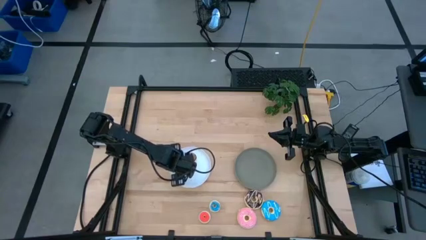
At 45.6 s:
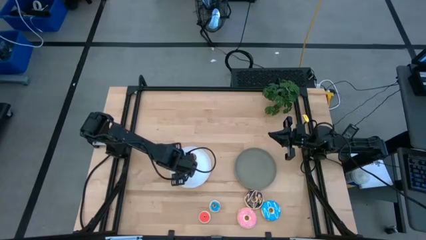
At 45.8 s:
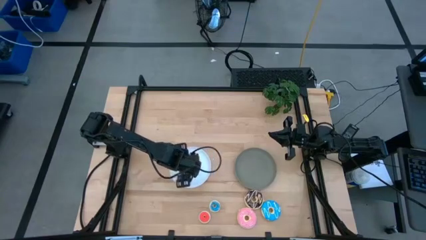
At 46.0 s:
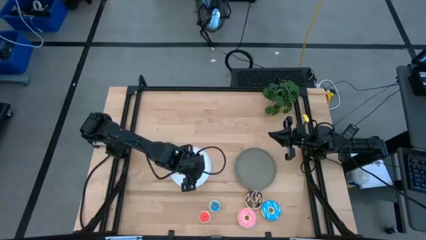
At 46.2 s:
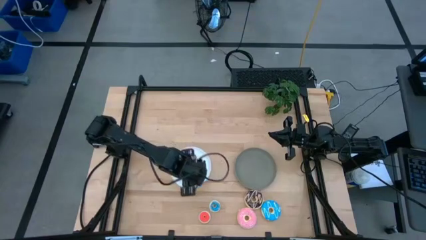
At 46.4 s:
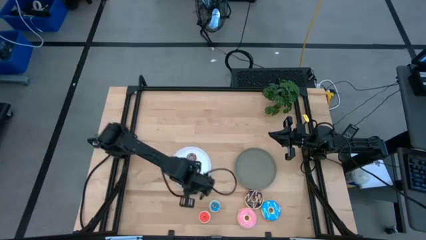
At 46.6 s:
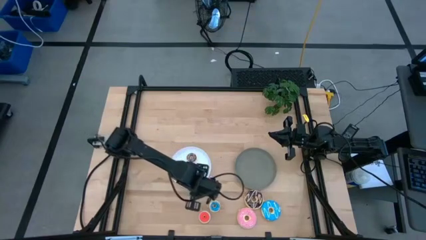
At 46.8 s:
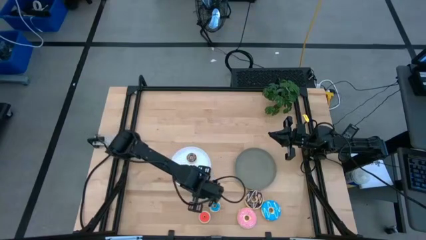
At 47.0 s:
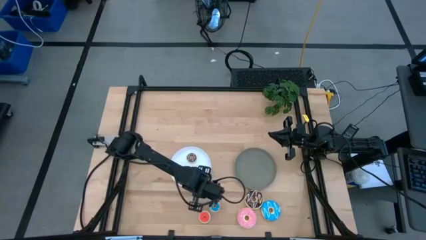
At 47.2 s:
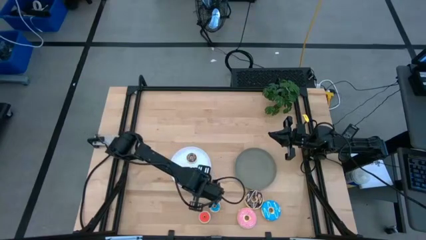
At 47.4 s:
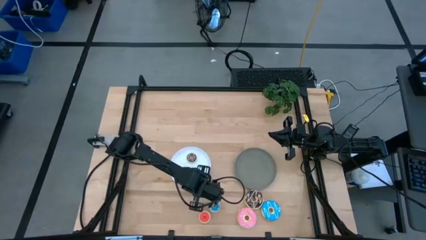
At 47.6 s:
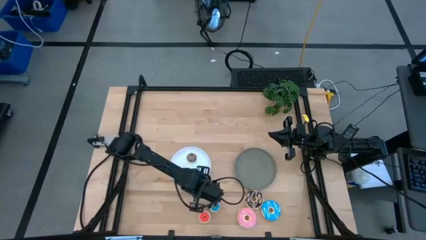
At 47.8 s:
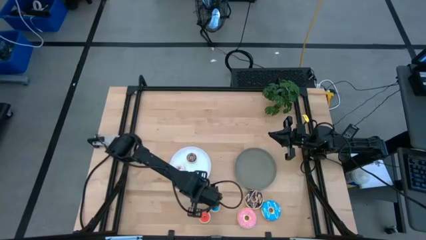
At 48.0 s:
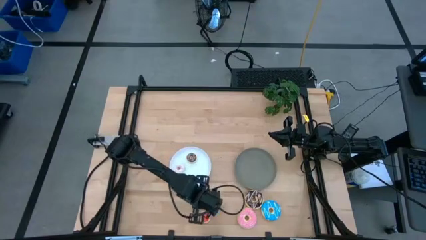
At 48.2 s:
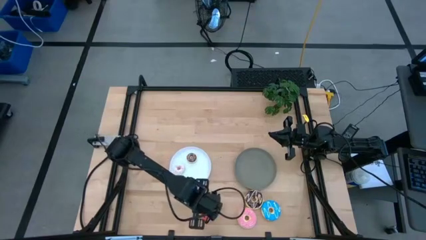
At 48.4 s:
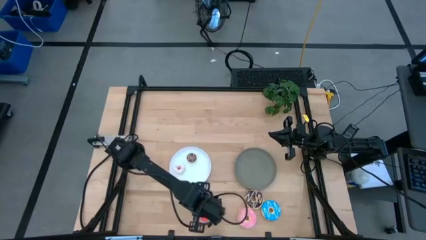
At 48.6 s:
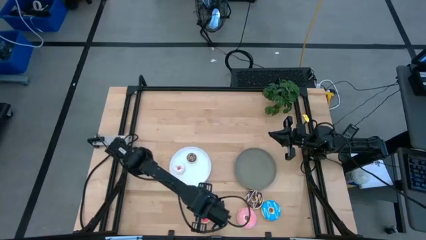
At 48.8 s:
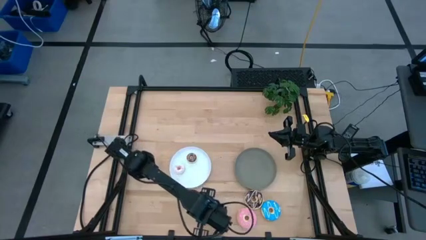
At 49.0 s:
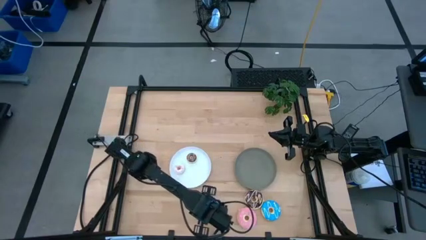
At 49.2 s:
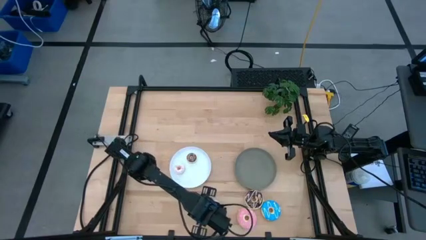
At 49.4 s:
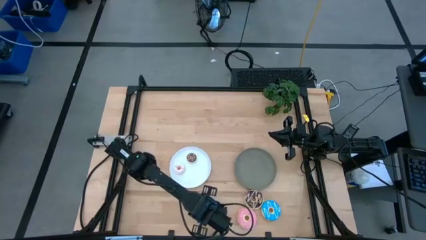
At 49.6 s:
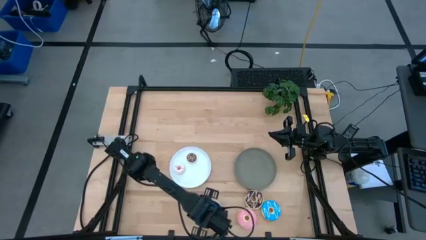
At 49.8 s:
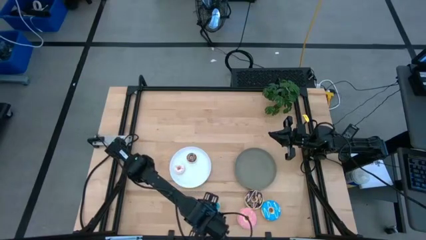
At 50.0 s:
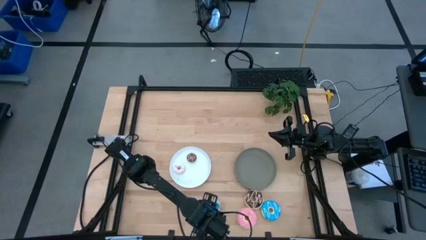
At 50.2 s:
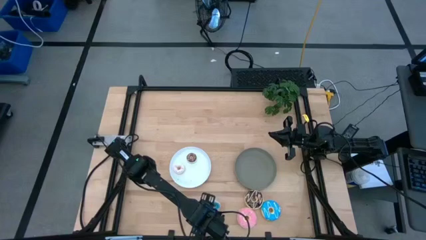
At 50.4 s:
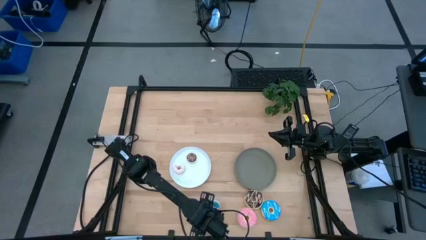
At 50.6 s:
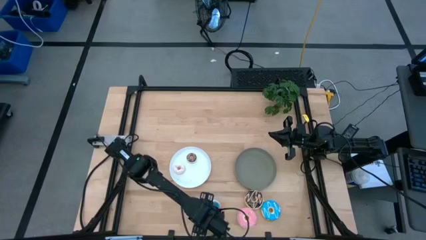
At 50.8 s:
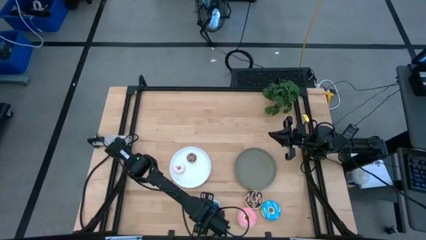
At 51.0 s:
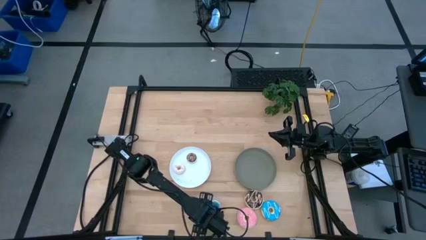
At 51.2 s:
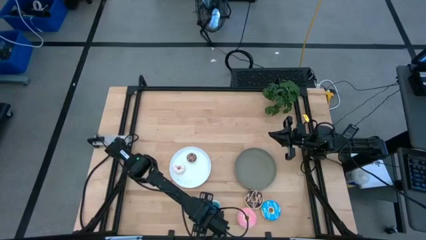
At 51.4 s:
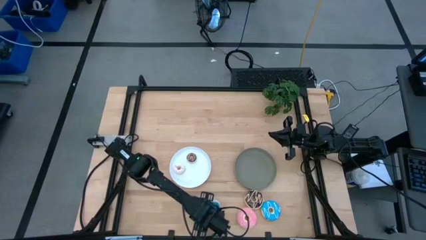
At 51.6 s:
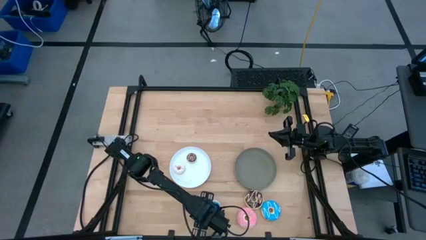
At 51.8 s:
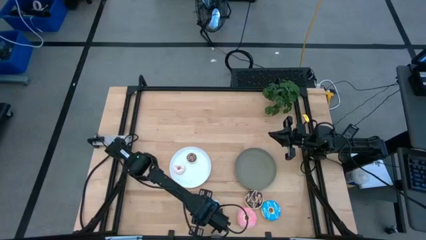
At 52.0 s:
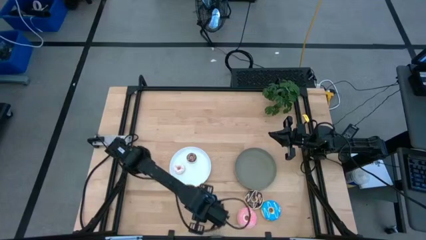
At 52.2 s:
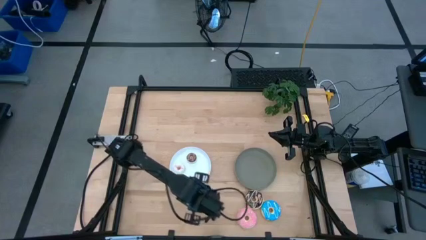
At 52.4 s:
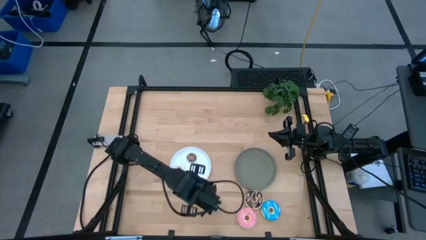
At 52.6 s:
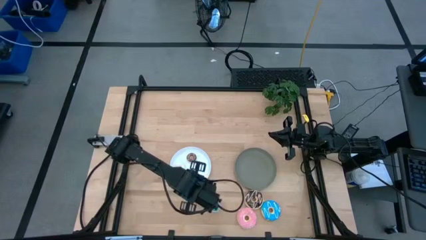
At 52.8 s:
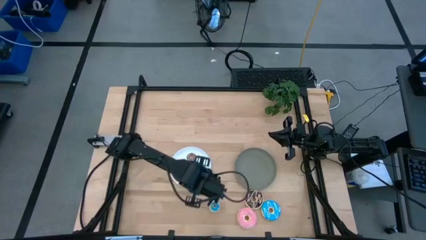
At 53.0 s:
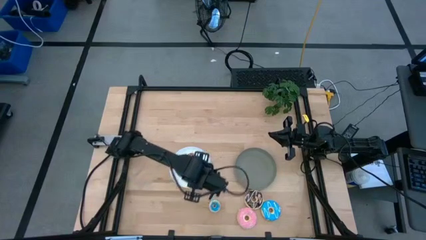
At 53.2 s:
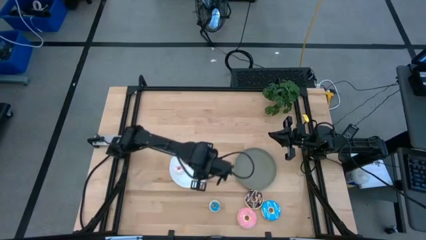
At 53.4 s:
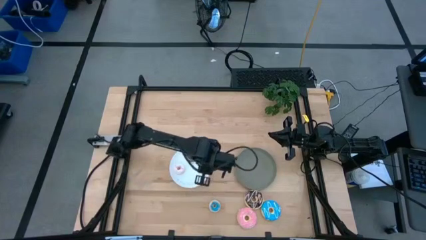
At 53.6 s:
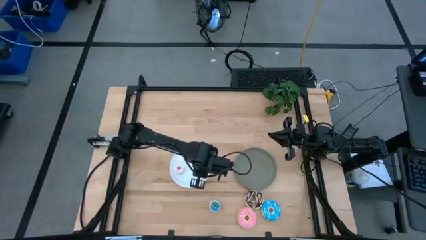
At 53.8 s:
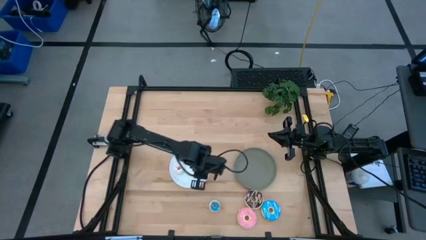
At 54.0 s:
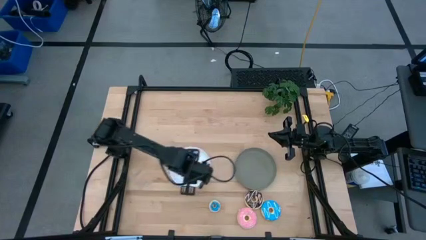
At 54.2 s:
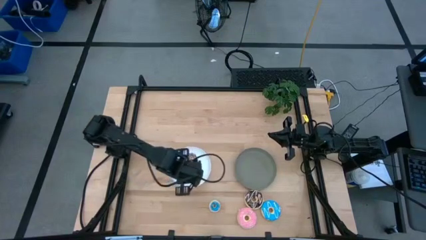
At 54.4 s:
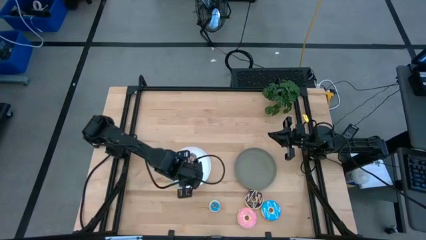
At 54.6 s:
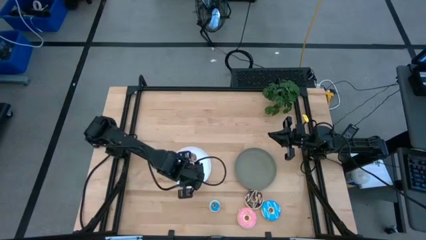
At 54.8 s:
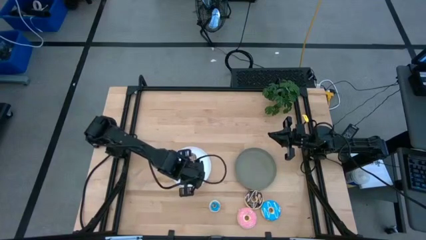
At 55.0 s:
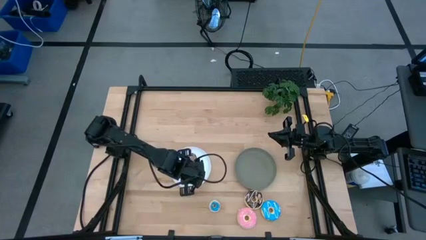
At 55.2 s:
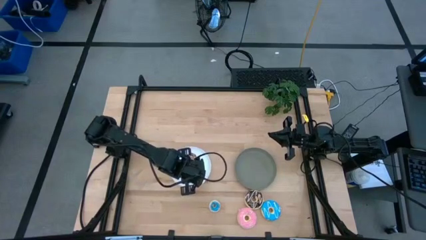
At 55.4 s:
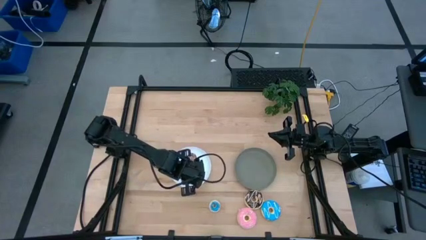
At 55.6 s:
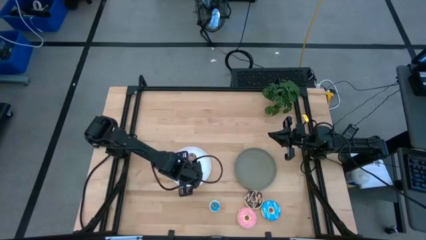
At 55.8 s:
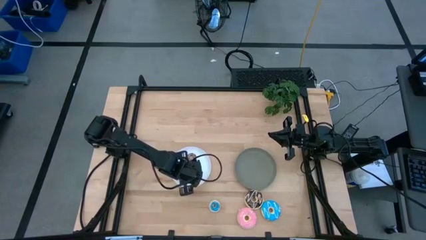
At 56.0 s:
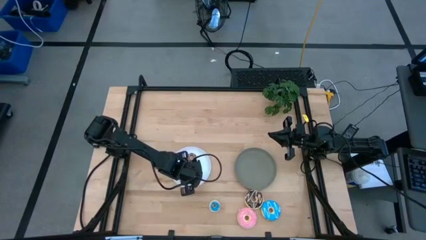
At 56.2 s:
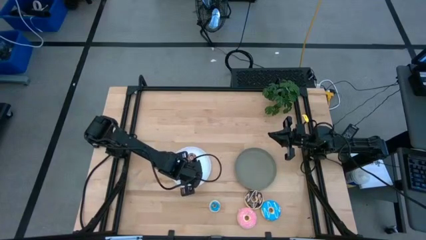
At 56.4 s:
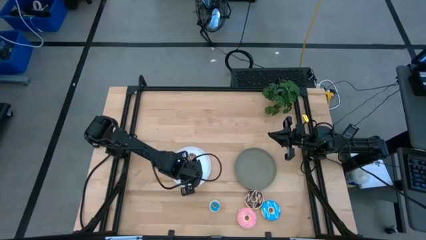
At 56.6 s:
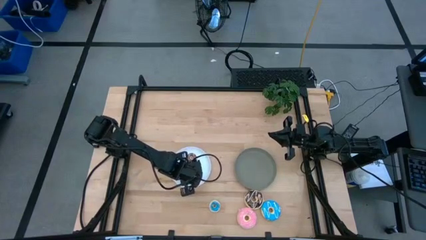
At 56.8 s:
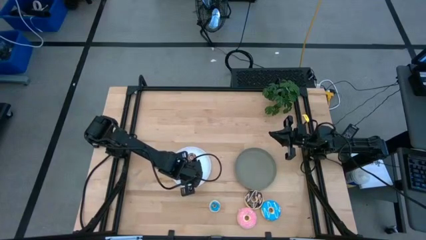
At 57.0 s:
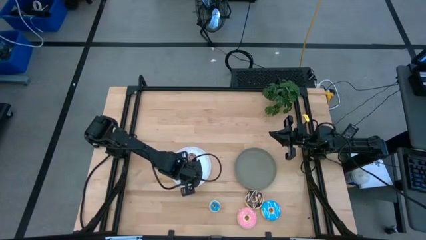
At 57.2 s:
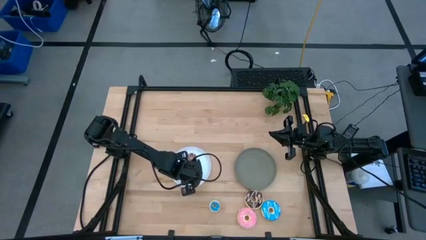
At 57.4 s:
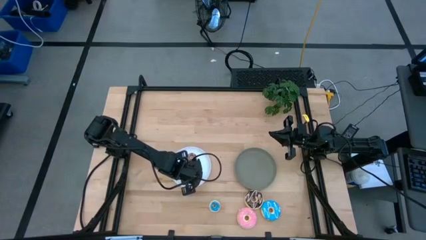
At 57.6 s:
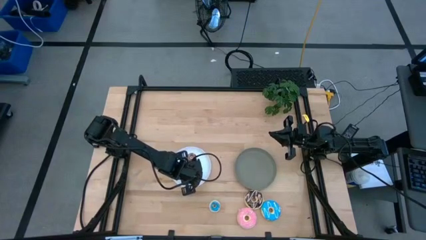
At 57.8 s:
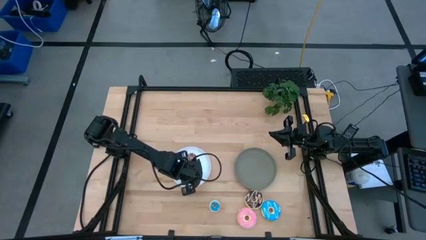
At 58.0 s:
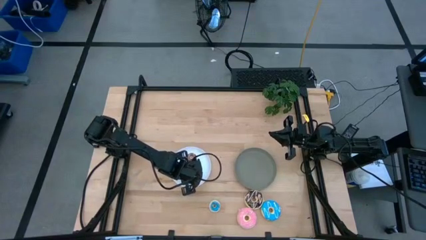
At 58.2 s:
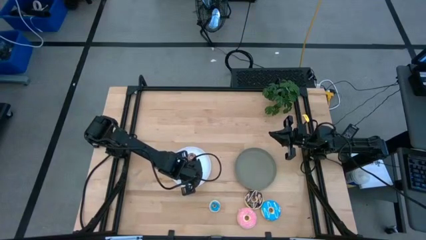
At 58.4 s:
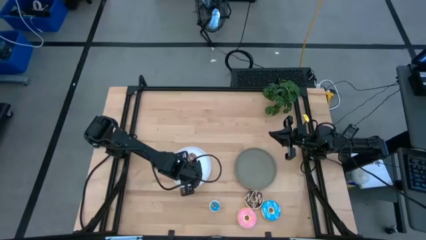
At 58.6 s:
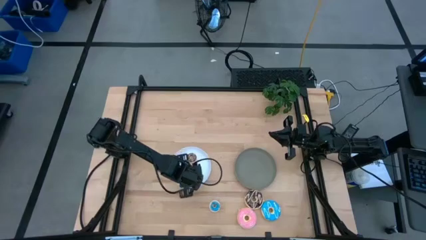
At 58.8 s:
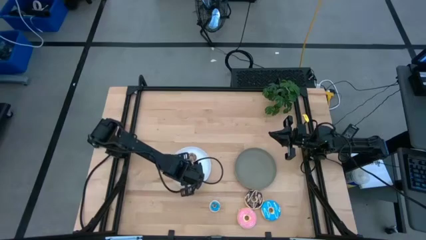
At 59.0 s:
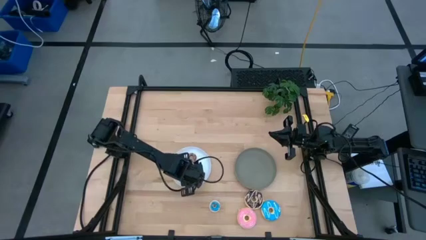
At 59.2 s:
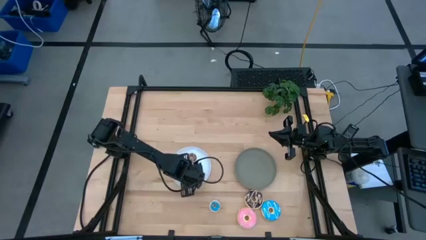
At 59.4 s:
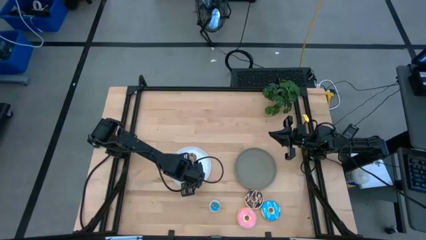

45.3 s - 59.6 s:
Task: Pick & Place donuts
Put the small orange donut on the white plate

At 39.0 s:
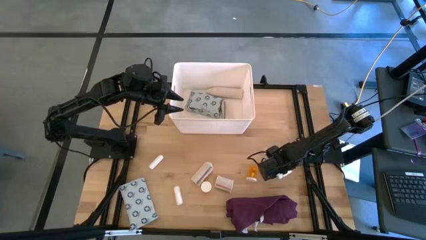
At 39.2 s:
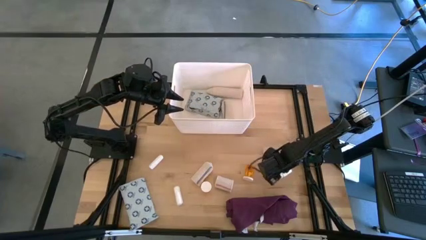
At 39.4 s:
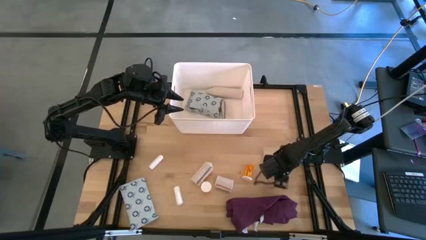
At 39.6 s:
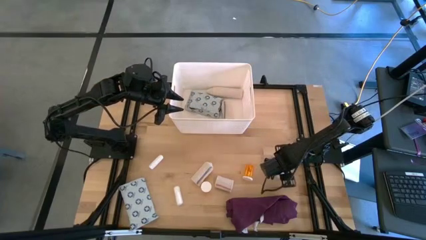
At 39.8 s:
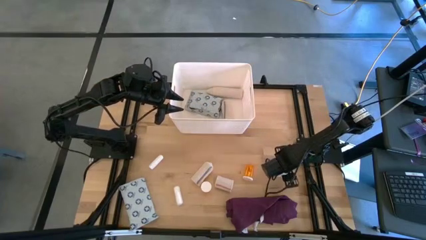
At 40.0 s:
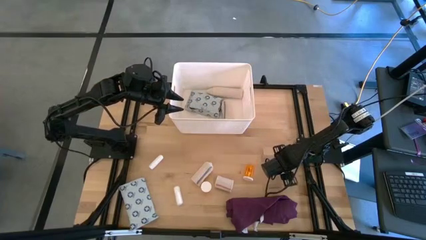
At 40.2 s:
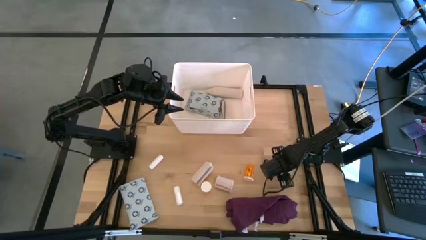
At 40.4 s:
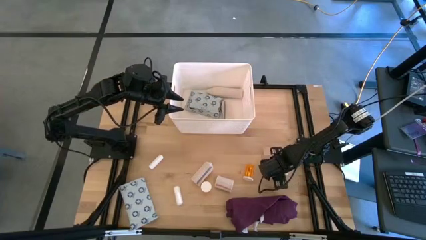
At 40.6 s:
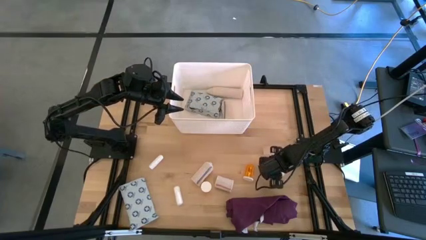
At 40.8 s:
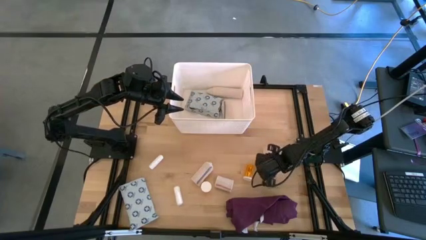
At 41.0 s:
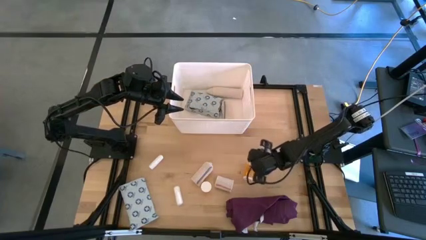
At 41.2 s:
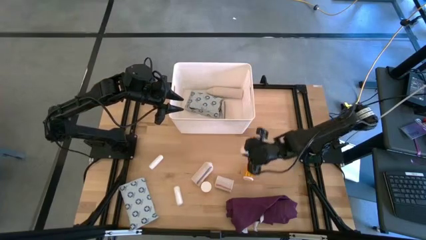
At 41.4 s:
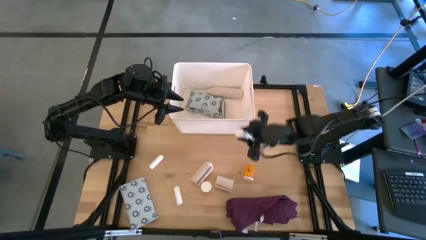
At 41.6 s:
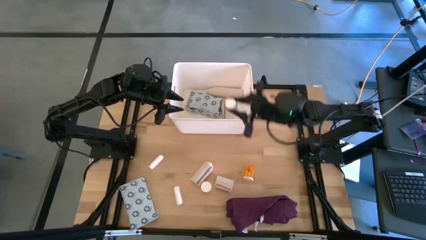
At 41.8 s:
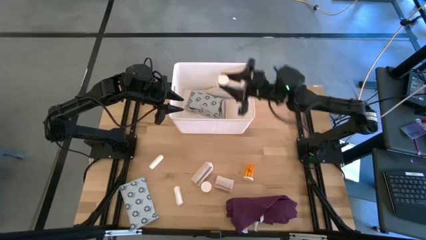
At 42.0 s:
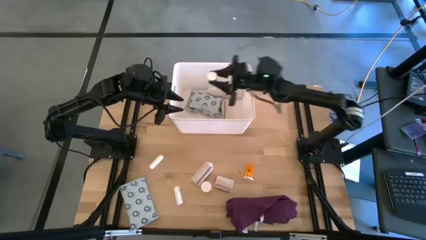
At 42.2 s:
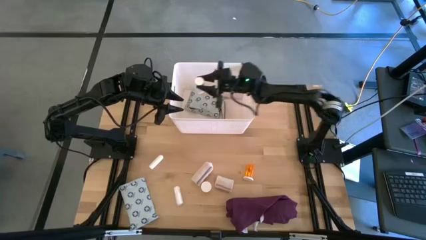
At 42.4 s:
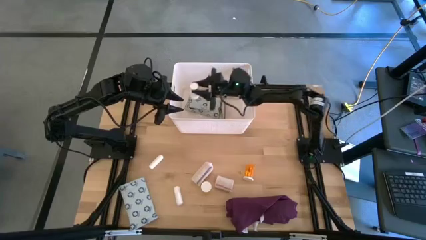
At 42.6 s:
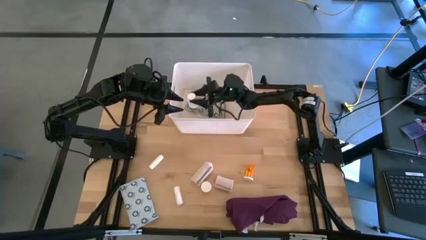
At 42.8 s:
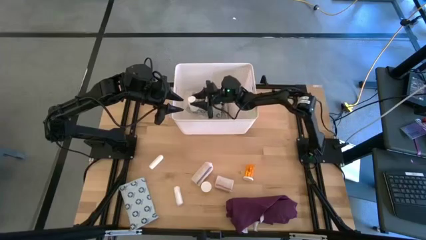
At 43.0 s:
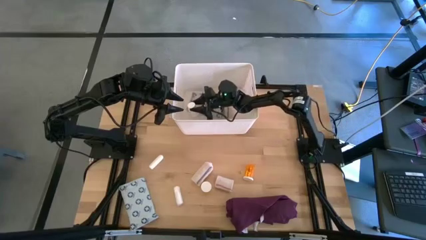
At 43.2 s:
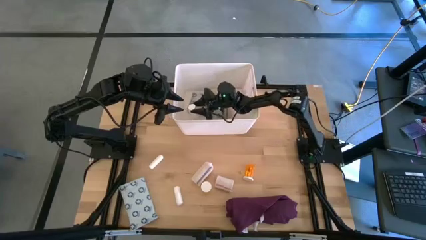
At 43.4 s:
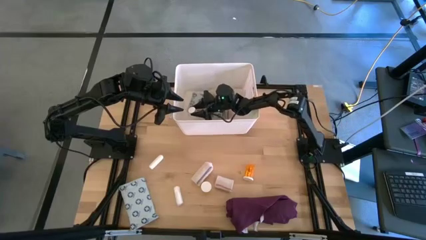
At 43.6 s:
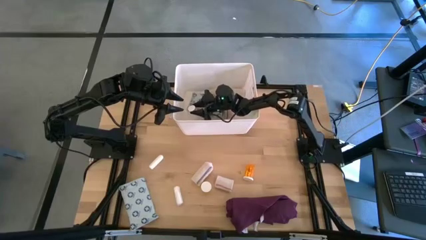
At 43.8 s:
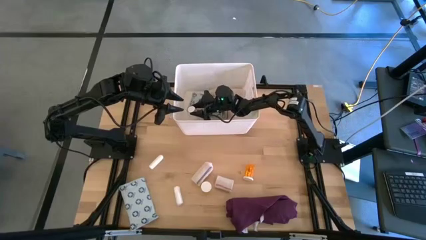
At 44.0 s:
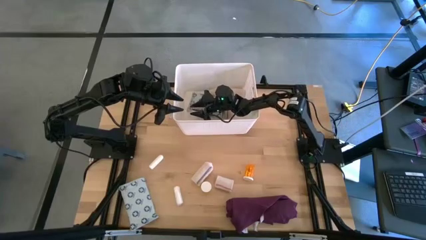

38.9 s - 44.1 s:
Task: Pick & place medical supplies in basket/bin
Put the white pill bottle into the white bin
